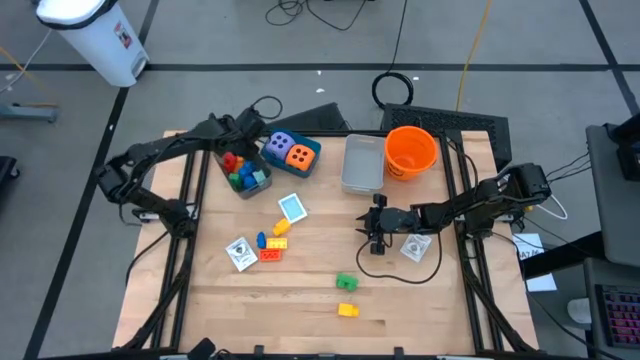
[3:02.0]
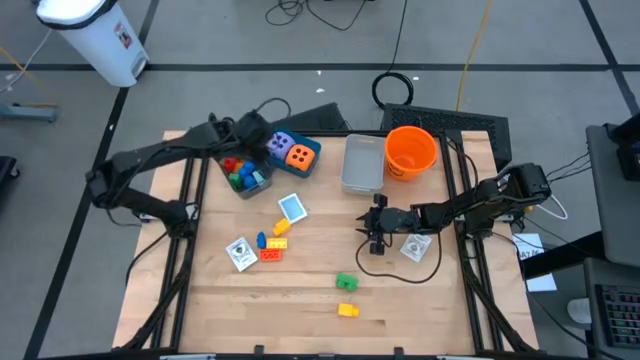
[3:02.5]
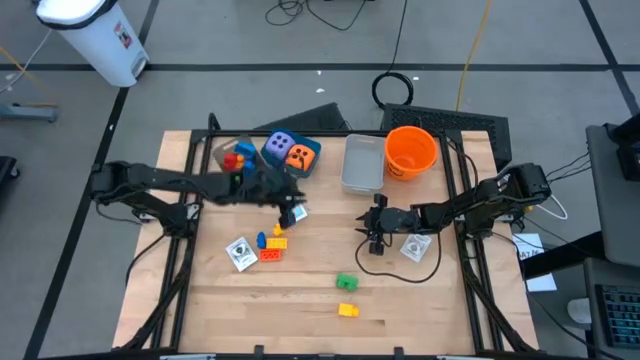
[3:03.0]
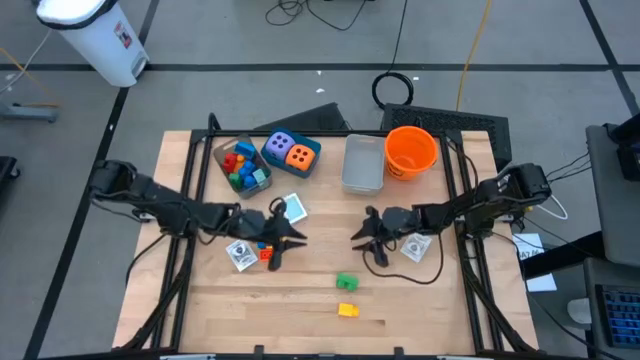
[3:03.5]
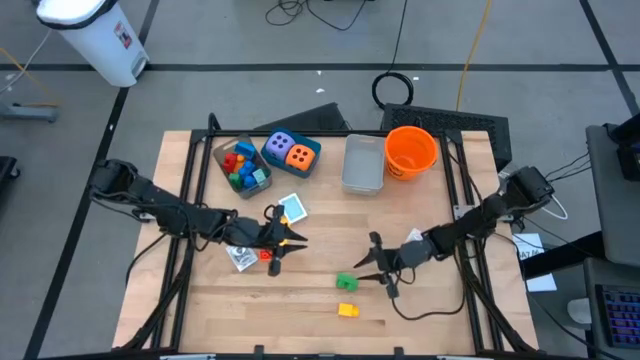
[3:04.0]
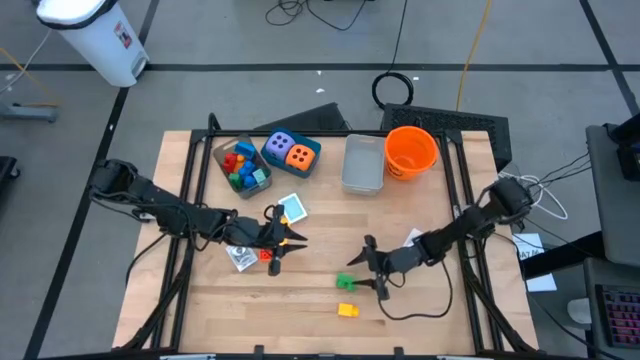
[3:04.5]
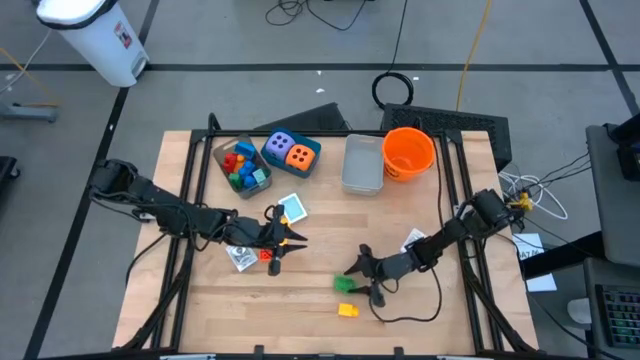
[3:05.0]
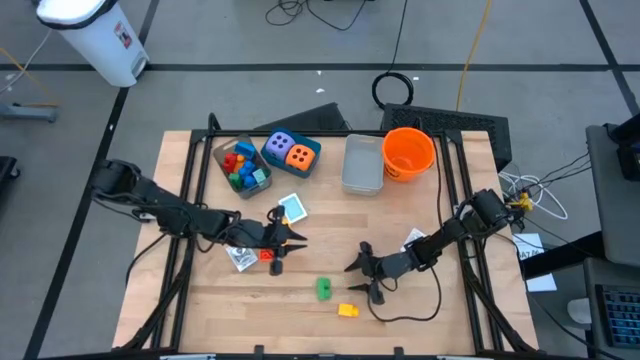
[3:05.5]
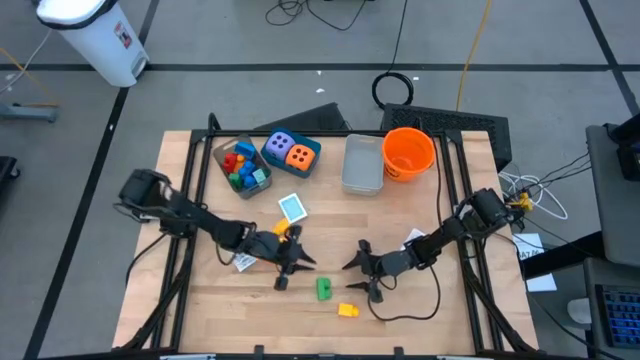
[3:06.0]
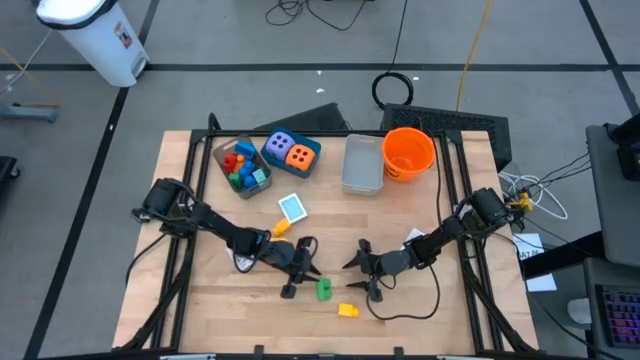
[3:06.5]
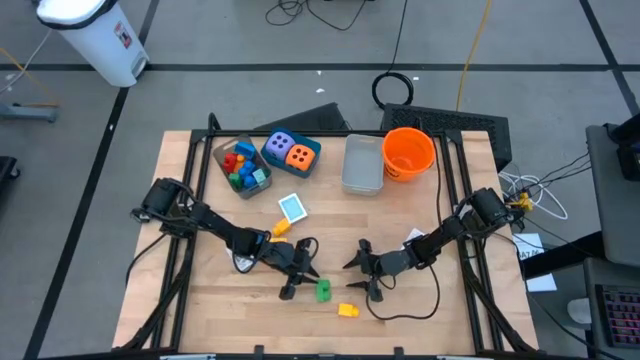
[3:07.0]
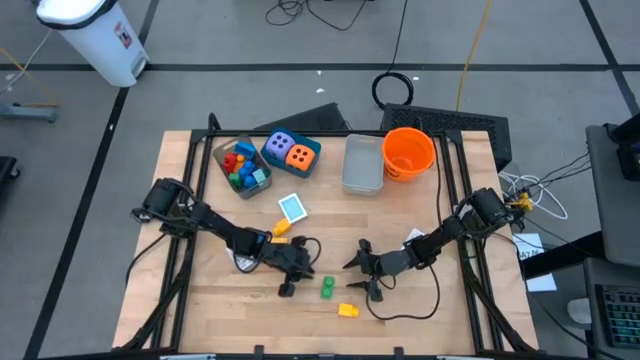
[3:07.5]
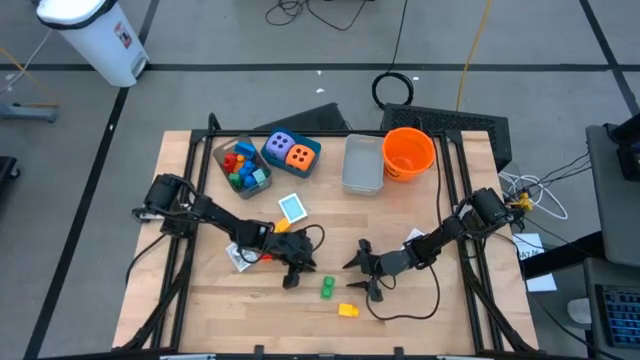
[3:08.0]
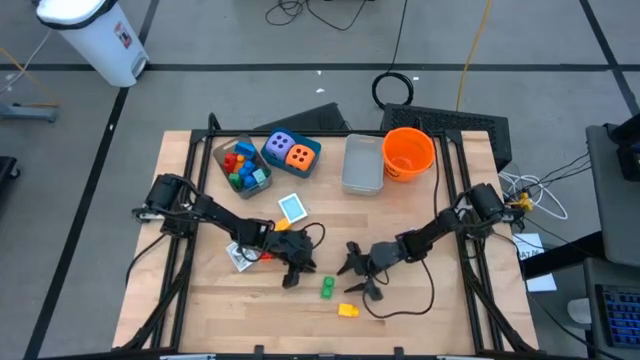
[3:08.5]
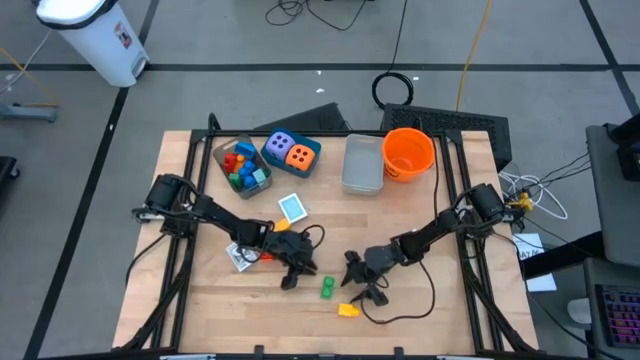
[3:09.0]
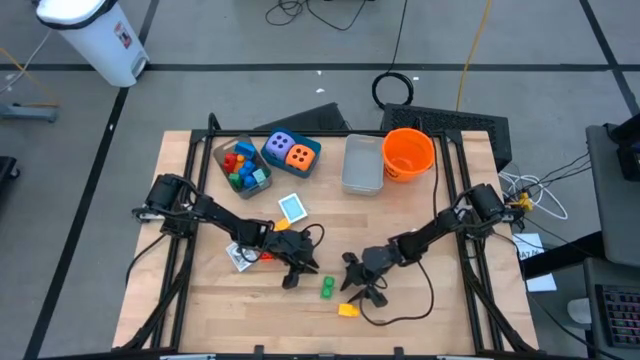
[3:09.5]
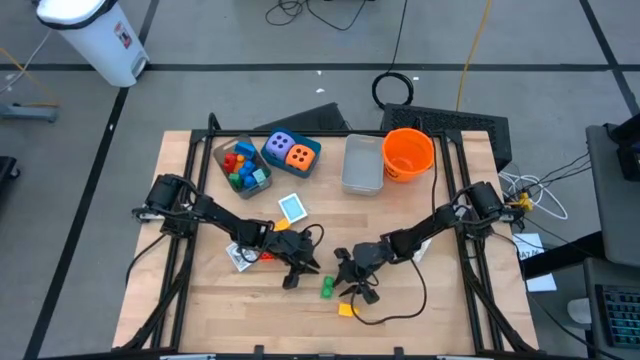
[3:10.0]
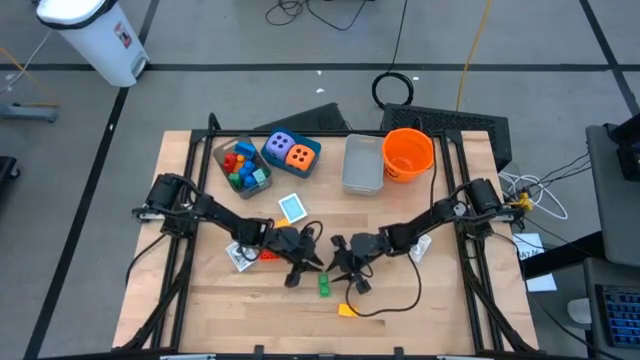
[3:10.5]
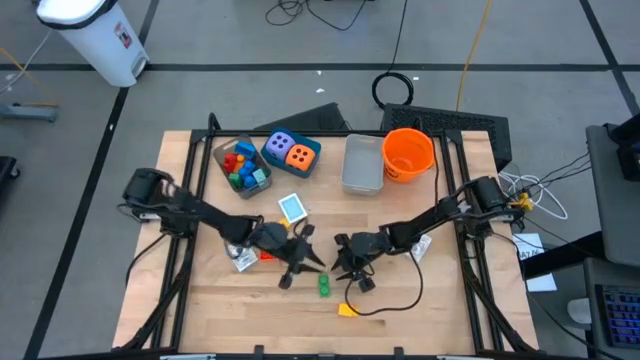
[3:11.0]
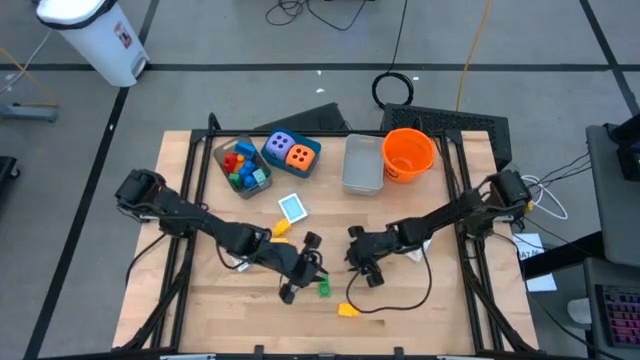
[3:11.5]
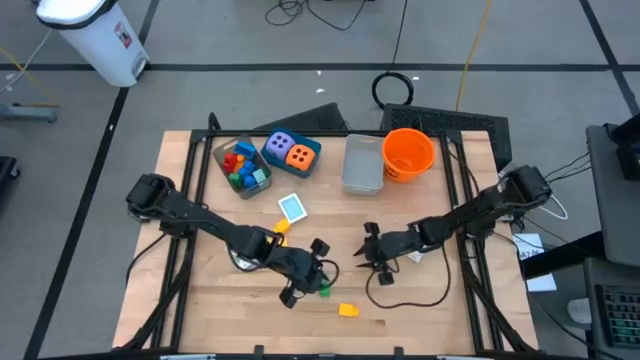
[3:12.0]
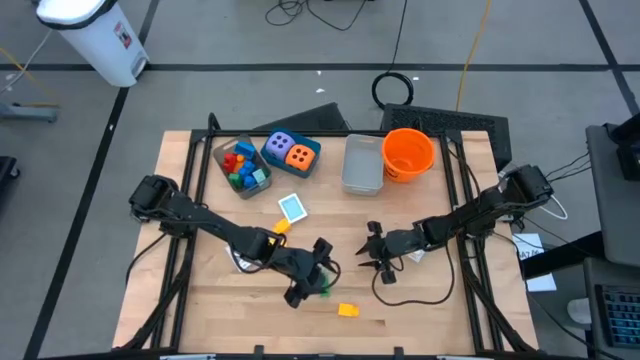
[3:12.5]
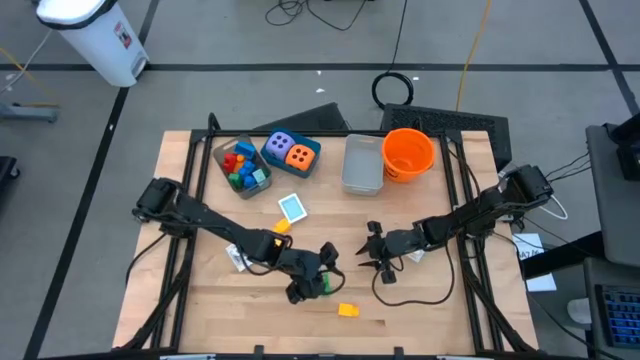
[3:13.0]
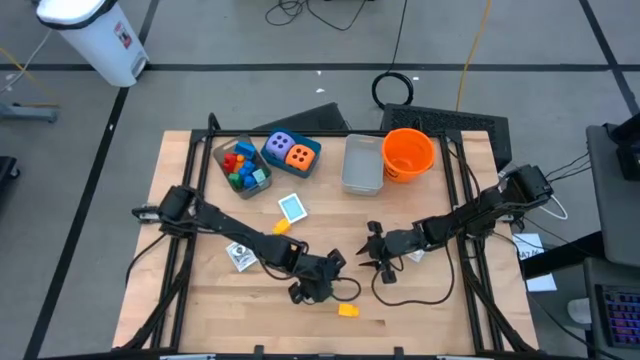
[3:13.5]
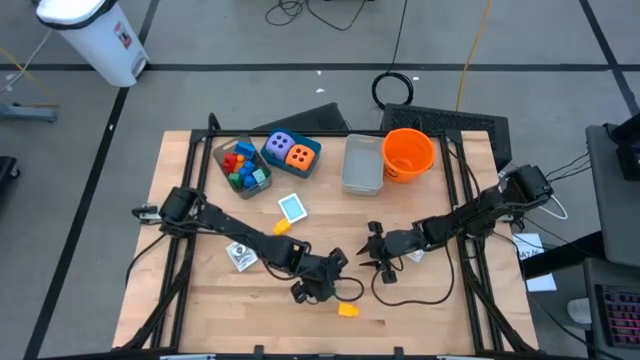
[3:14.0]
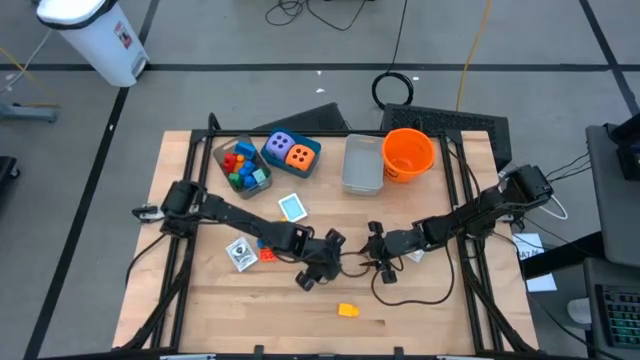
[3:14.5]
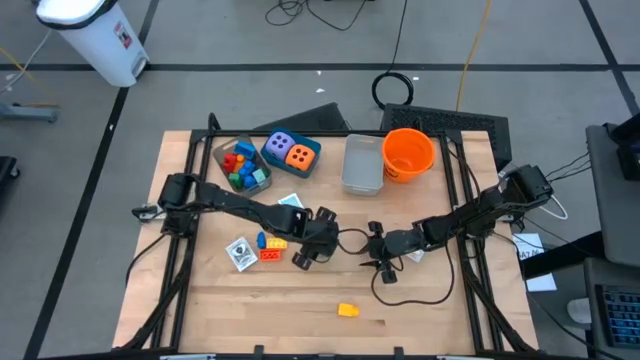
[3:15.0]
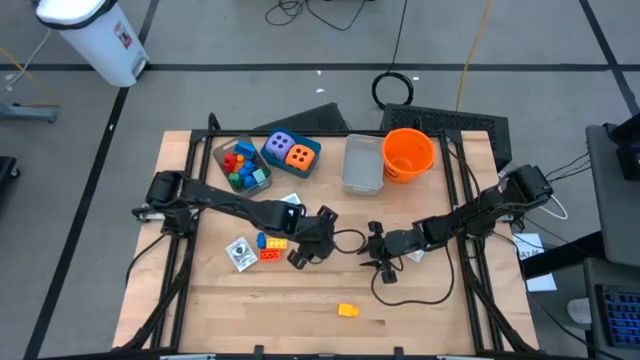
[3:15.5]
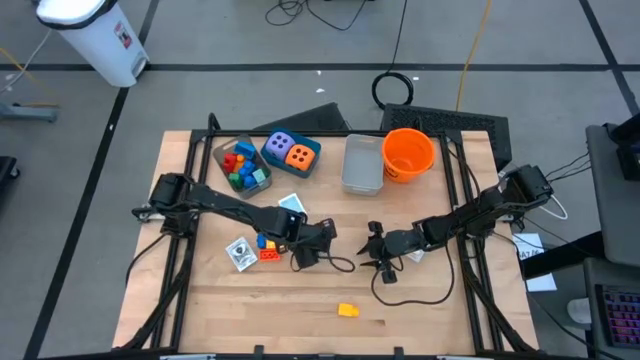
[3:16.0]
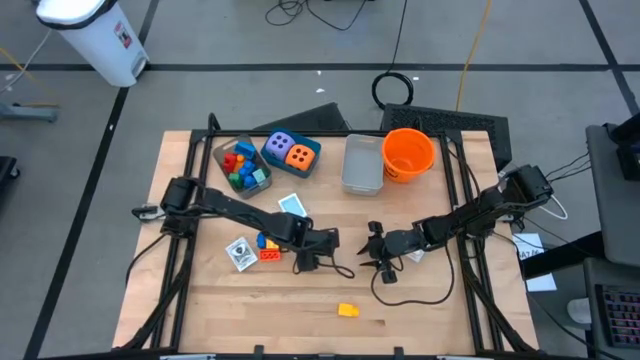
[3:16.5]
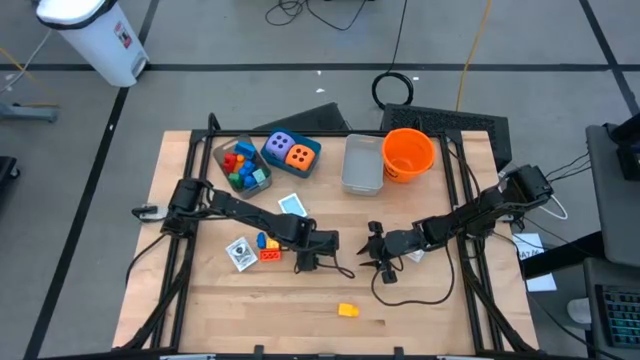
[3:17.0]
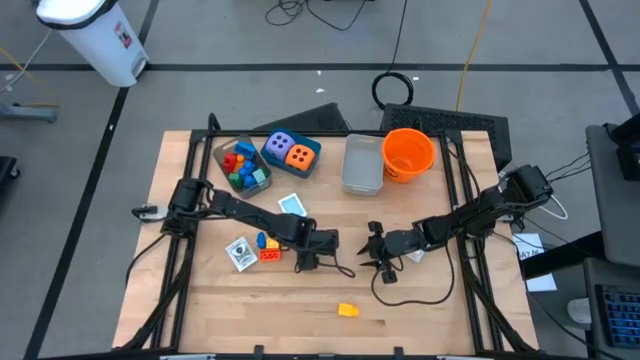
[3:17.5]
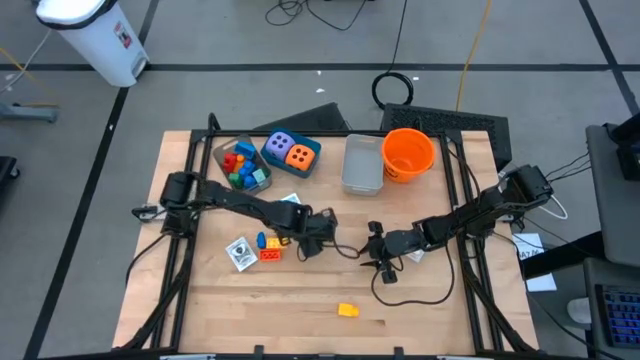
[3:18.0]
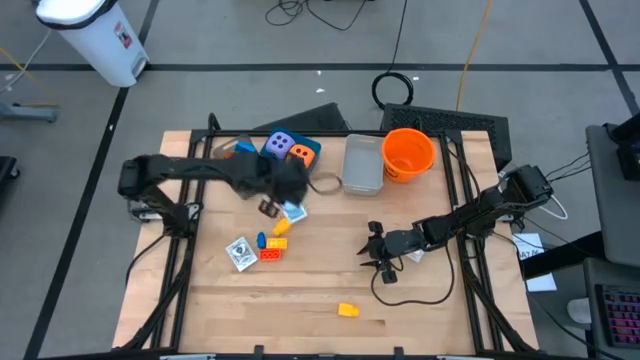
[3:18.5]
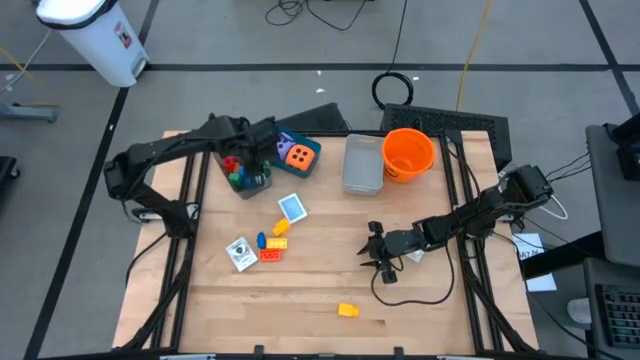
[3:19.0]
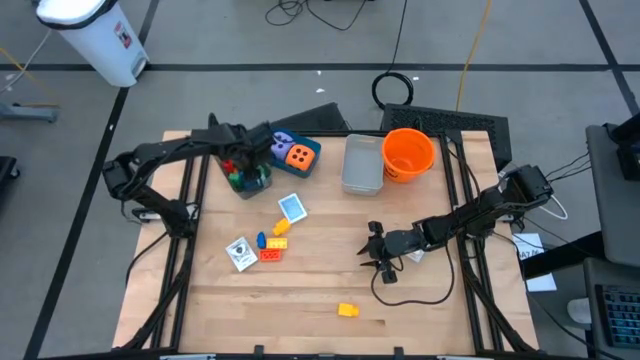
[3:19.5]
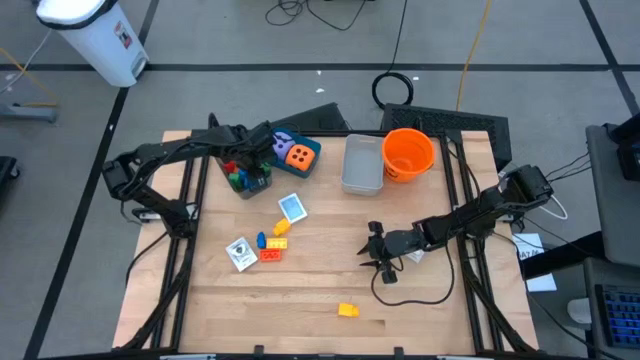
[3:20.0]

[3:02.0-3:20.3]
Task: Pick & Place Toys
Put the green game piece into the black bin

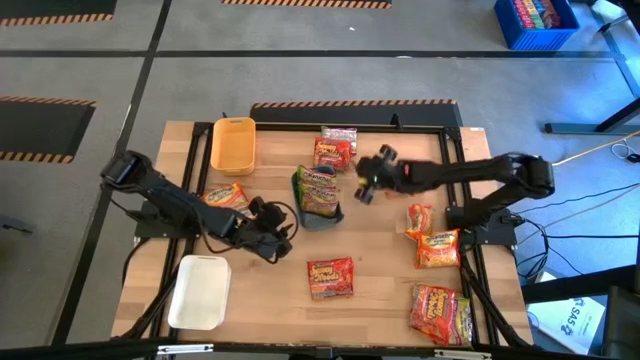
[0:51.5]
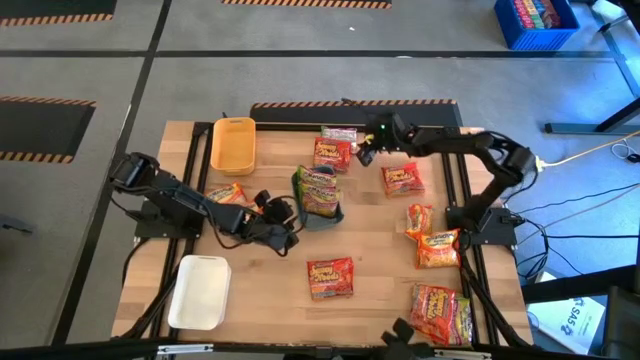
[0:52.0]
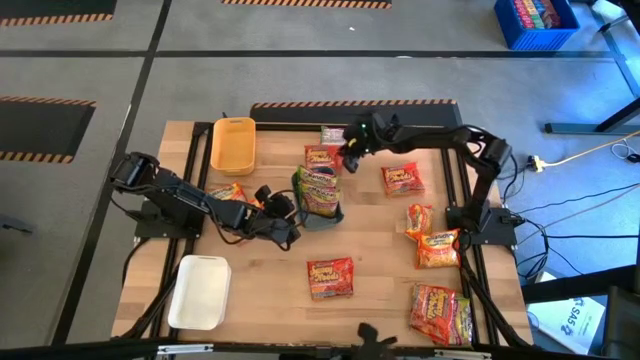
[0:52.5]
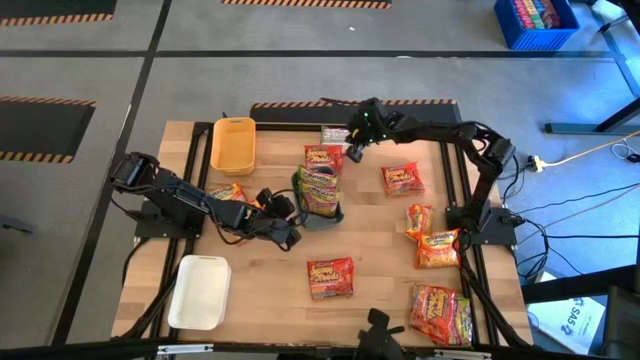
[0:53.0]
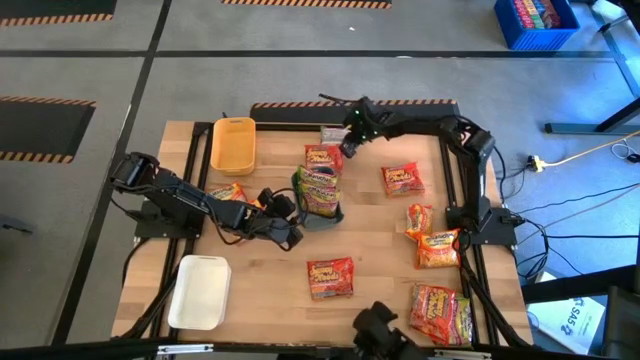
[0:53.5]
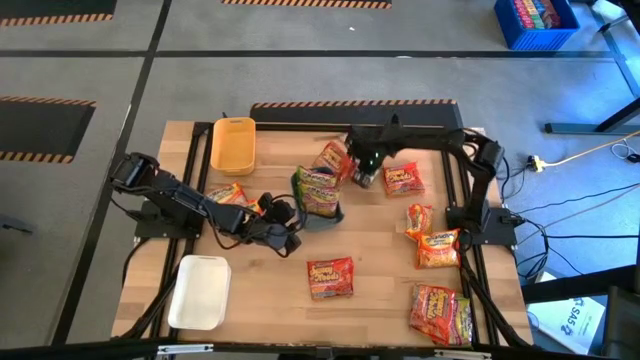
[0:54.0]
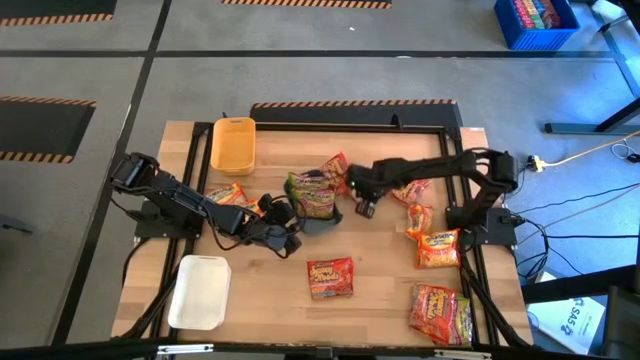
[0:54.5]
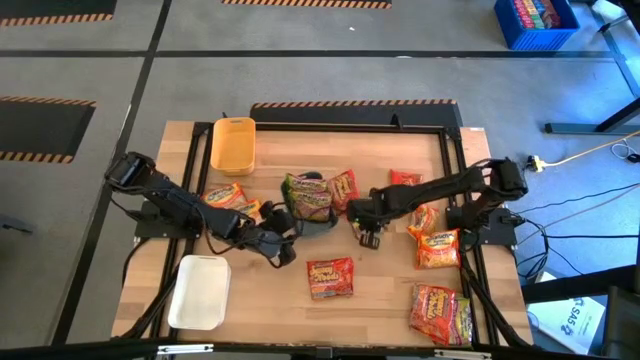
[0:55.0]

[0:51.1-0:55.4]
Task: Sort Maruchan noodles
Move the green noodle pack to the center of the table

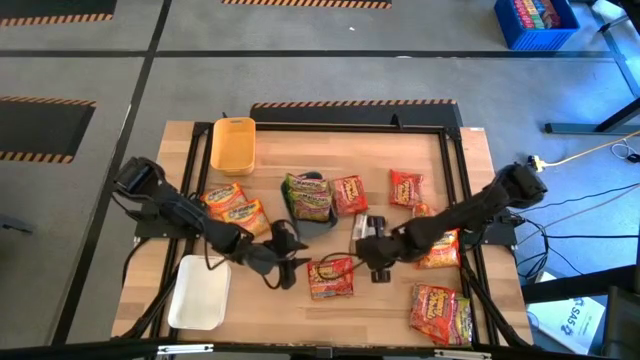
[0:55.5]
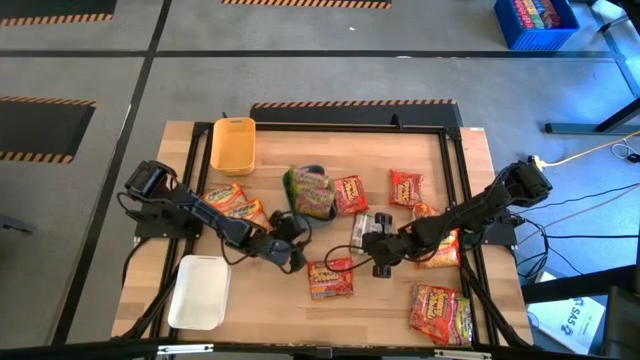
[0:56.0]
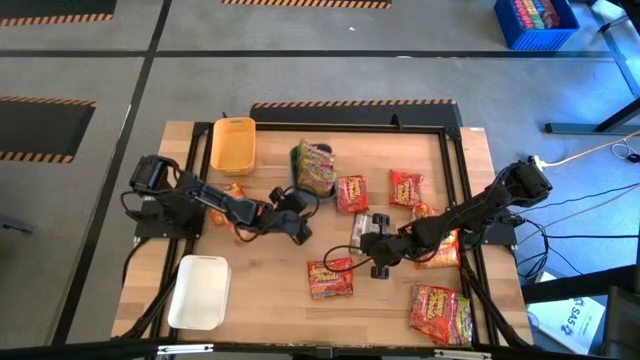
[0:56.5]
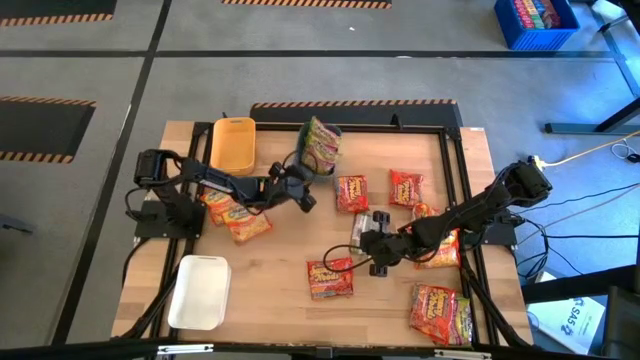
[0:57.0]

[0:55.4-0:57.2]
Move the blue bin to the top of the table
